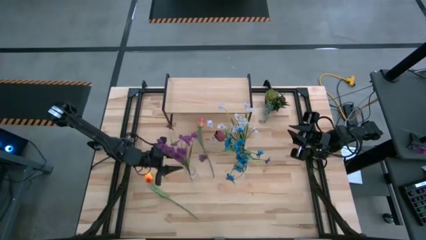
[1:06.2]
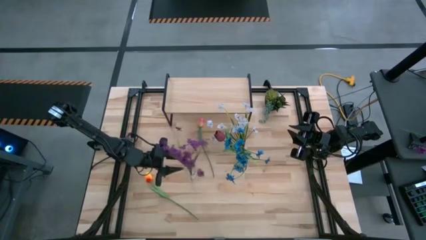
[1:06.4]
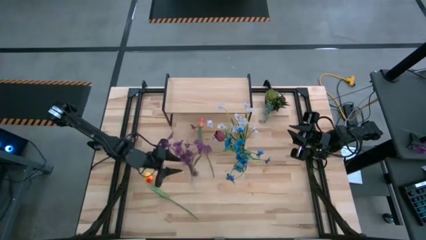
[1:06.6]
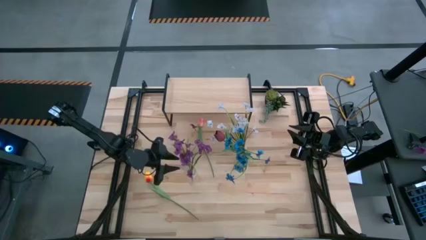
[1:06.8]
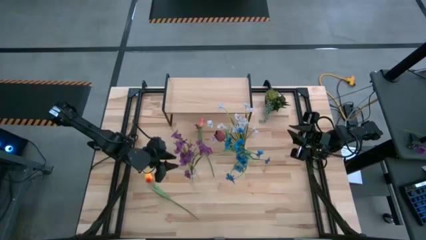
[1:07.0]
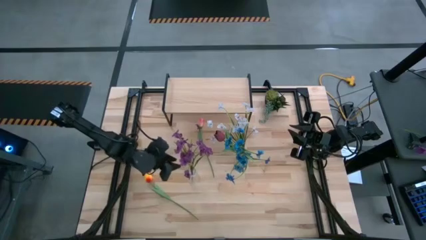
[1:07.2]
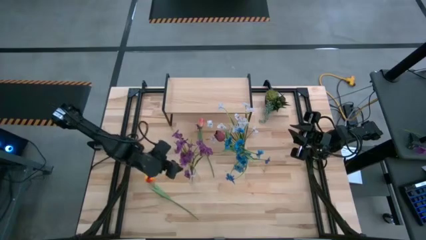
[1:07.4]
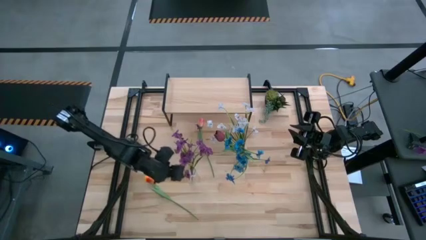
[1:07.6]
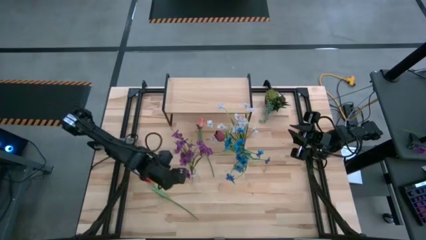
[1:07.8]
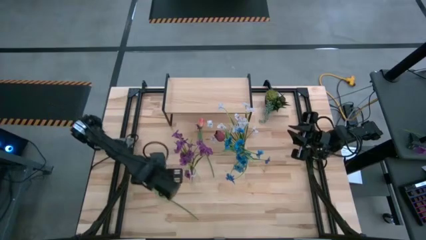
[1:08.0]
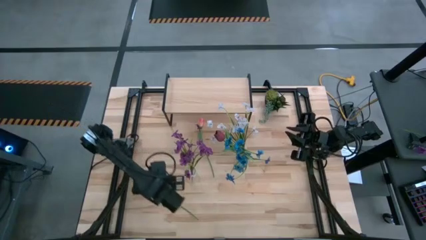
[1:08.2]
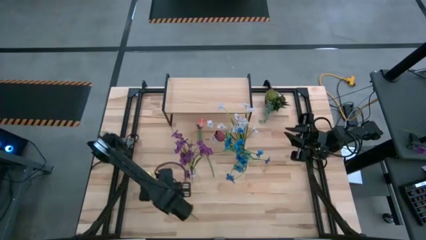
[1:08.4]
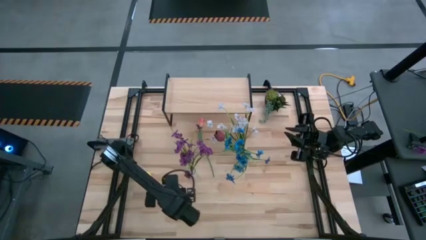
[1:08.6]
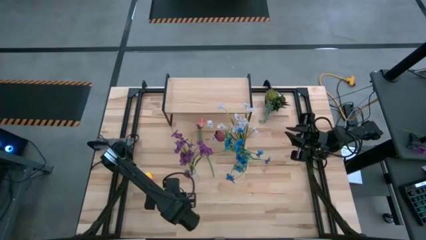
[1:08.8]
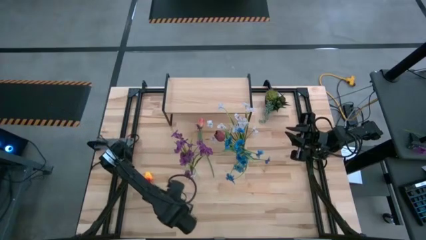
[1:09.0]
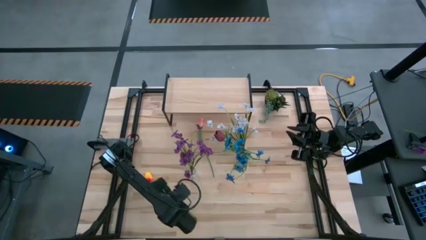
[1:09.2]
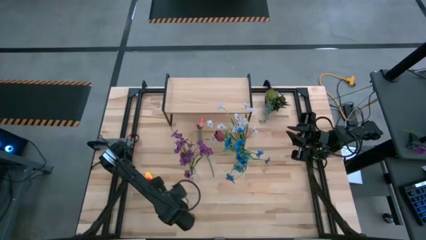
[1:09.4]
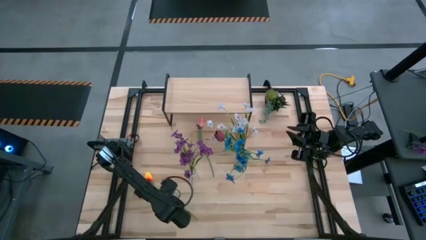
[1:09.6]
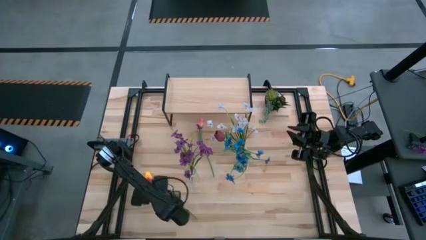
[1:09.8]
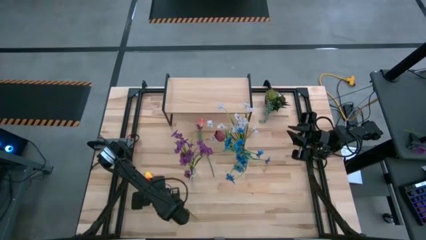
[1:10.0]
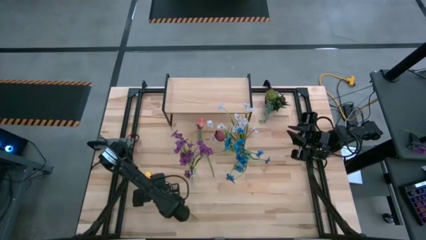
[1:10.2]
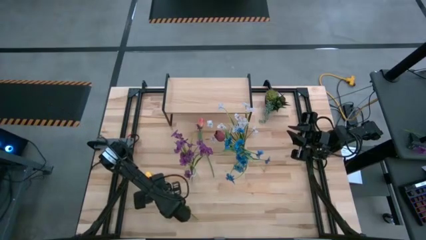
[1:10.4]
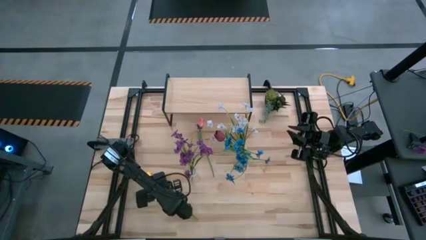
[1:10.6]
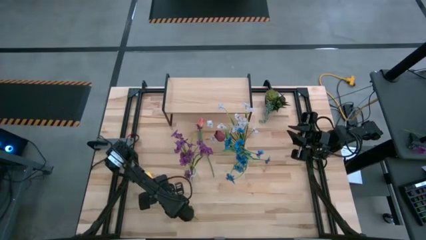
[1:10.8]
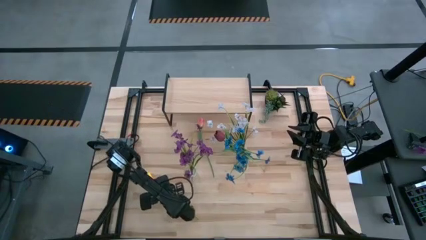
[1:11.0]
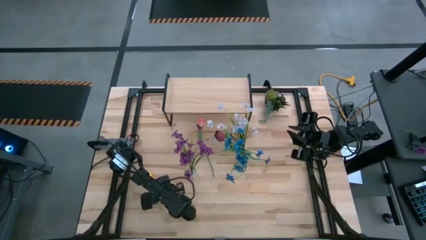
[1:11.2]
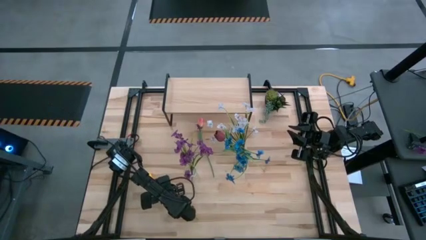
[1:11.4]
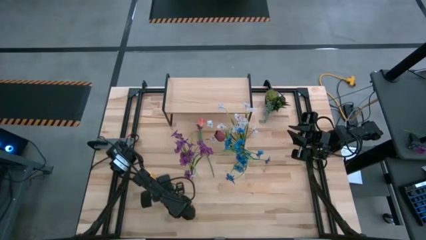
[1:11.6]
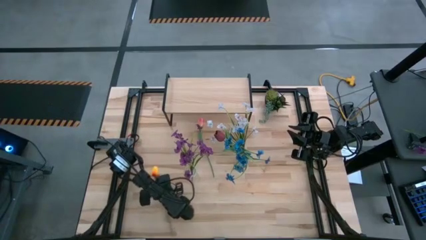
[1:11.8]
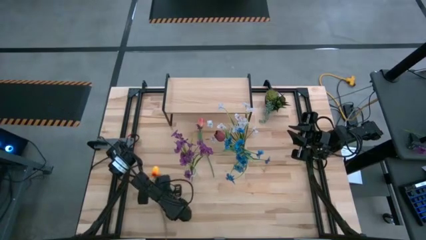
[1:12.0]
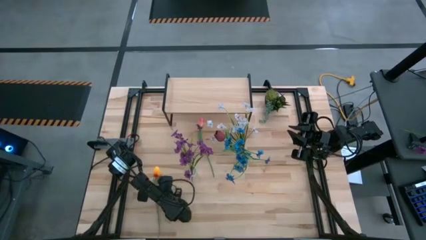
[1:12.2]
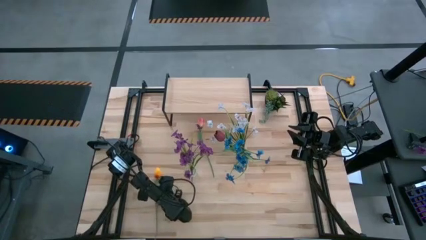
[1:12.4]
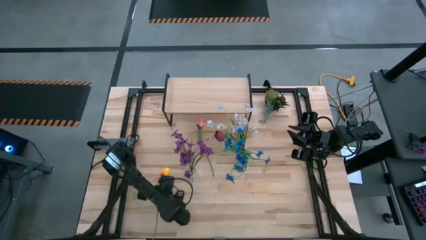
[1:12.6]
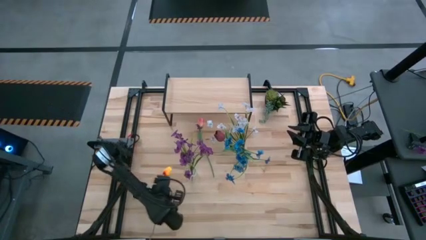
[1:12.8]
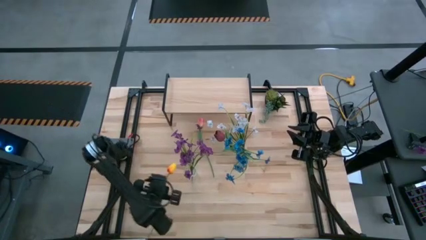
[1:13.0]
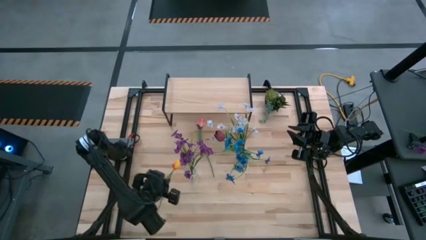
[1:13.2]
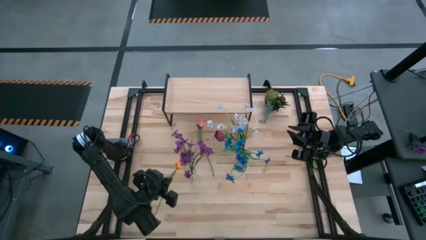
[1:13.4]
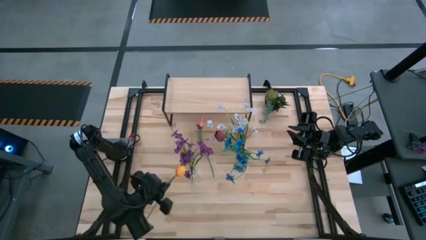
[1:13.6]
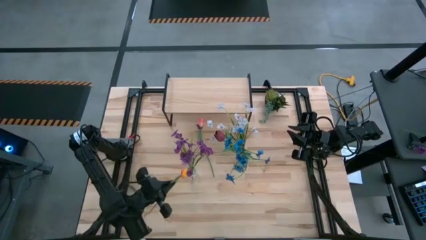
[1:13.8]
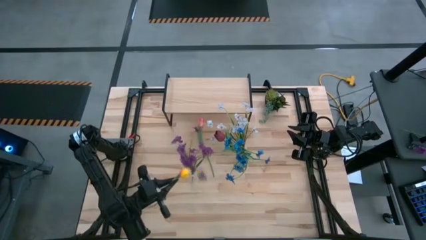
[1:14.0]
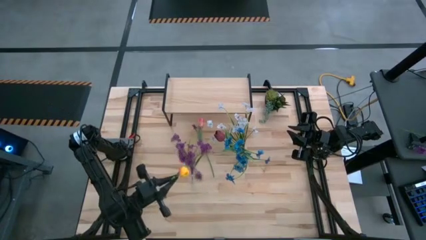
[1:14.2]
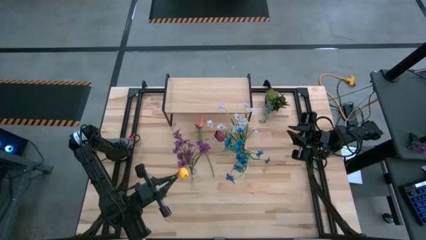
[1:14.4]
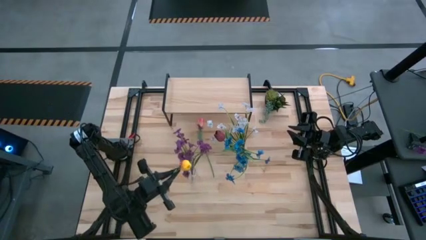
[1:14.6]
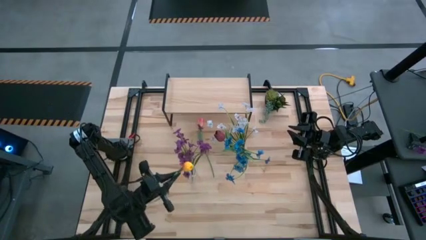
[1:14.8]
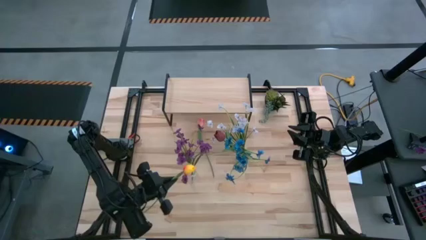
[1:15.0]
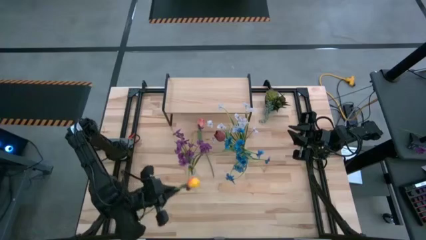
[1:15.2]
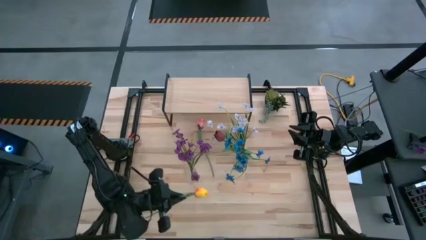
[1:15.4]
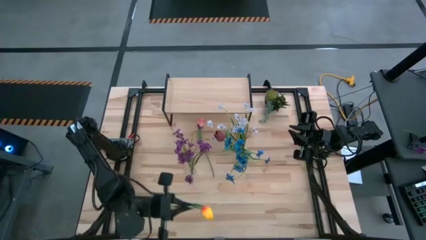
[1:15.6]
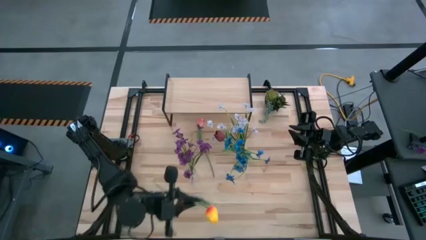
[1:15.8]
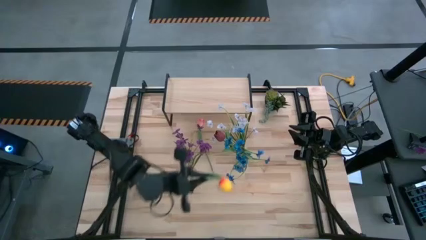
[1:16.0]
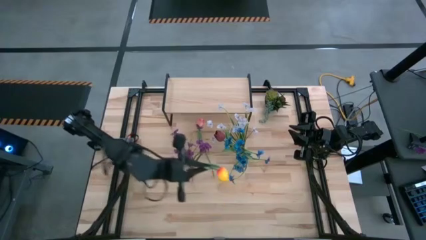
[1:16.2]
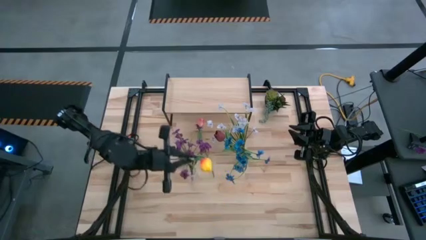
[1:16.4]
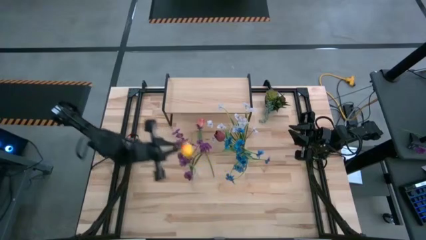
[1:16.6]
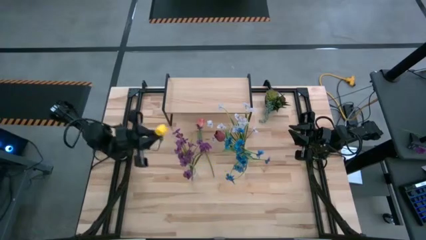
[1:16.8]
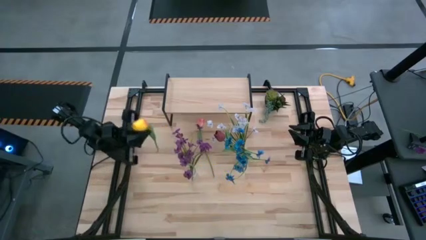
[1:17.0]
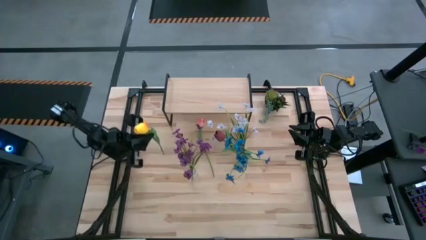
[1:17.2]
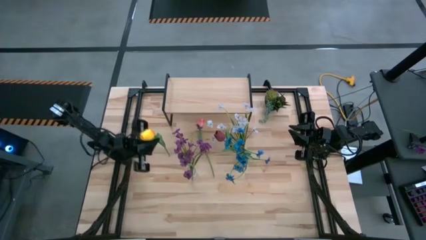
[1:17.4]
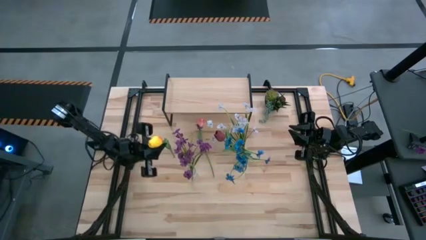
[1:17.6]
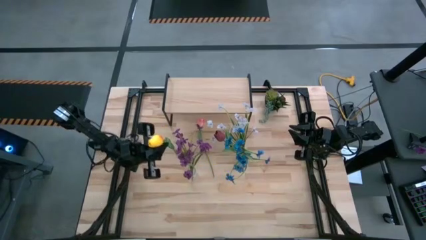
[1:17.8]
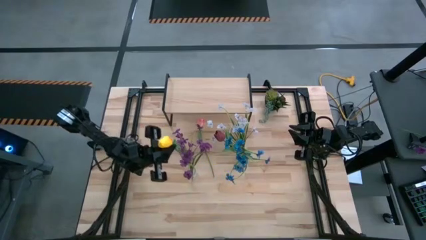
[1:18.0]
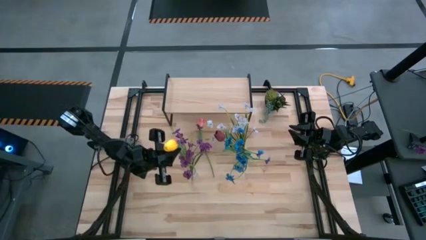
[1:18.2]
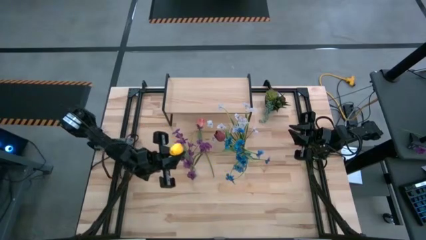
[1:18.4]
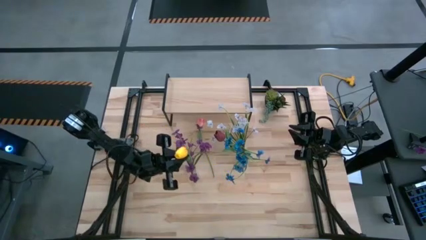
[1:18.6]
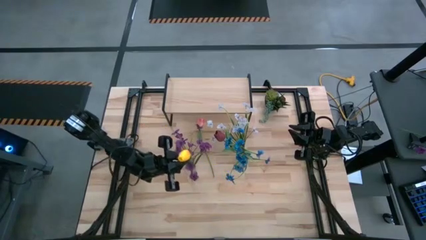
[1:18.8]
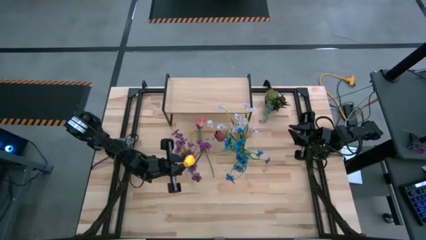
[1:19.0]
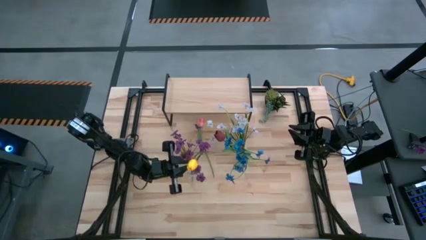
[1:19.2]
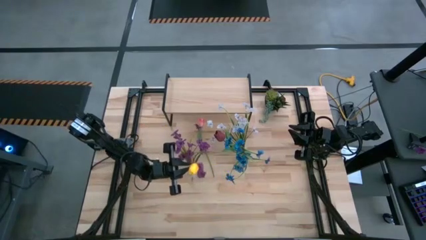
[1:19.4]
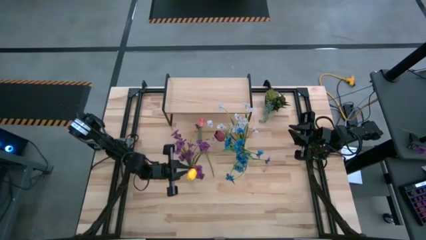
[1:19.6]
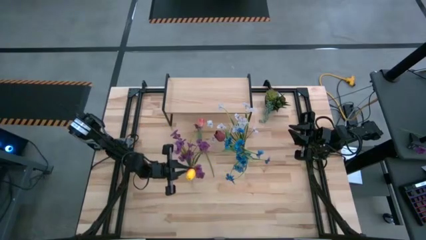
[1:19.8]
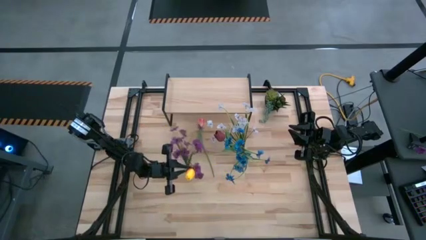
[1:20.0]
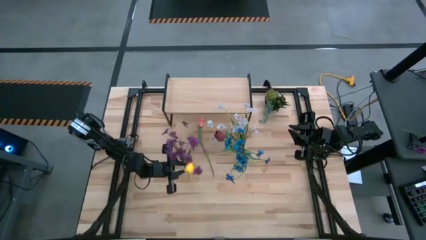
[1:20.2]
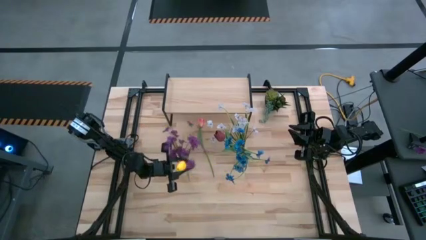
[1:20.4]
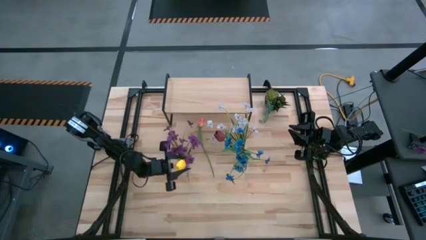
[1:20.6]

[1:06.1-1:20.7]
Task: Pick and place flowers into a vace then onto a shelf
Put the yellow tulip into the left crystal vase
